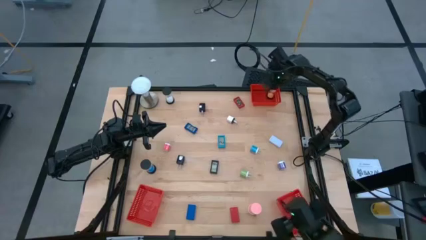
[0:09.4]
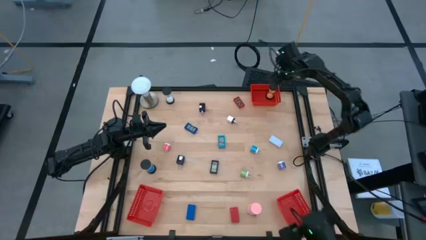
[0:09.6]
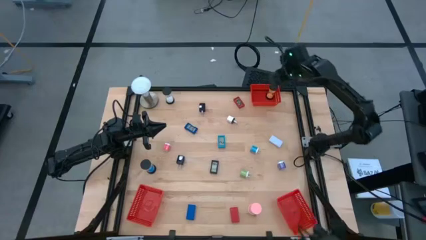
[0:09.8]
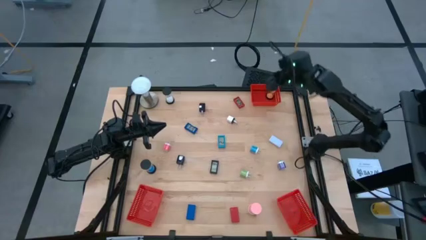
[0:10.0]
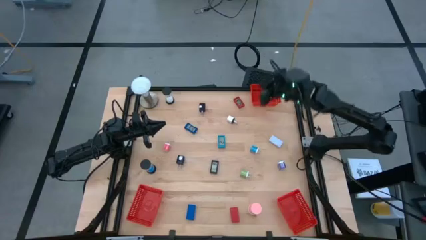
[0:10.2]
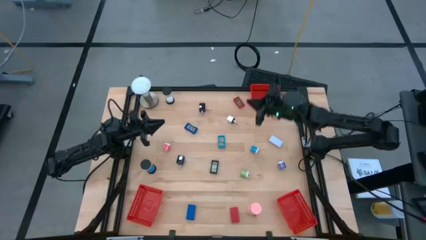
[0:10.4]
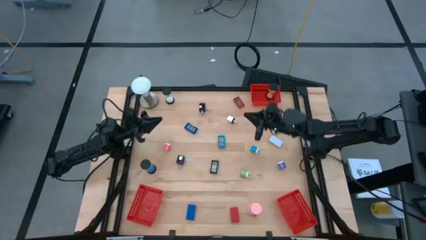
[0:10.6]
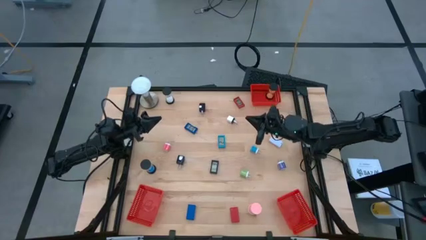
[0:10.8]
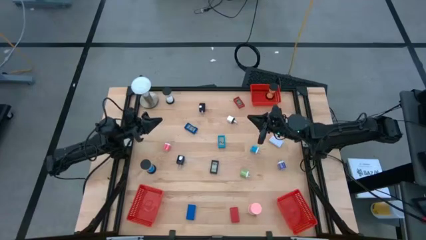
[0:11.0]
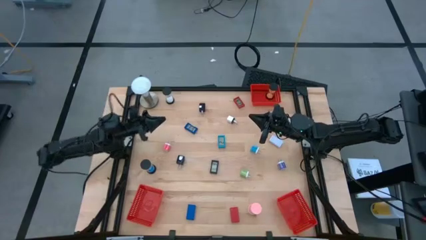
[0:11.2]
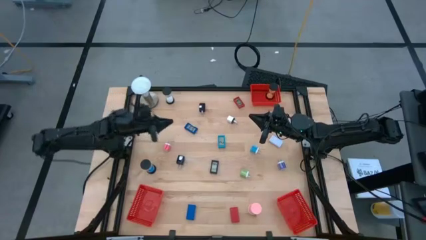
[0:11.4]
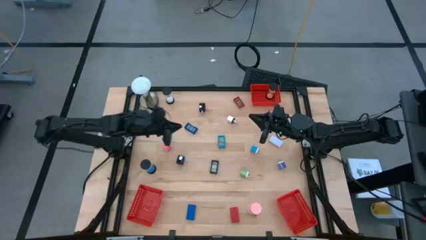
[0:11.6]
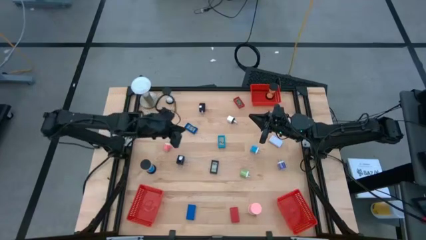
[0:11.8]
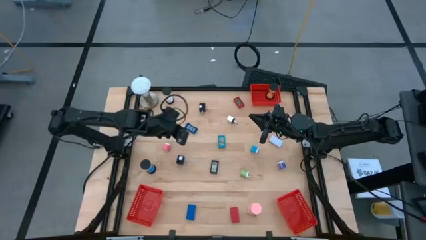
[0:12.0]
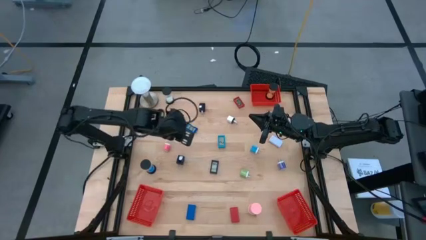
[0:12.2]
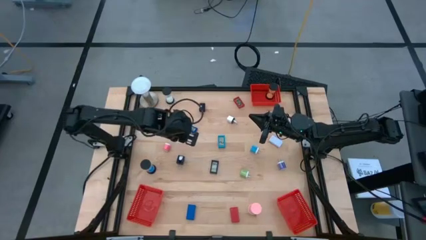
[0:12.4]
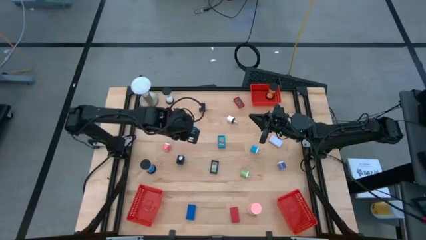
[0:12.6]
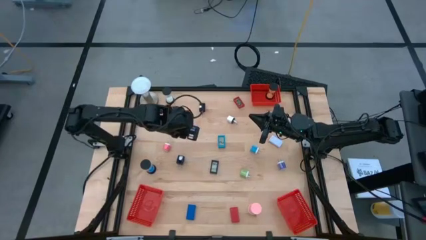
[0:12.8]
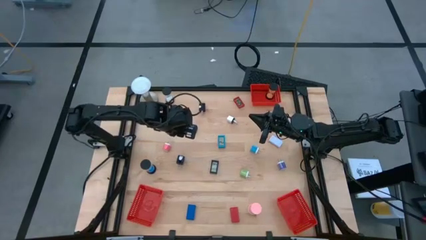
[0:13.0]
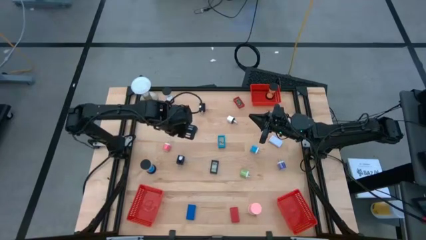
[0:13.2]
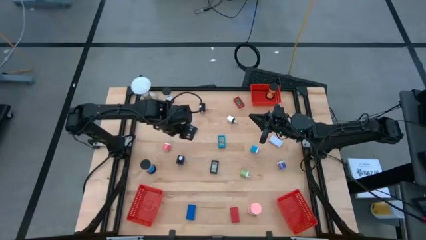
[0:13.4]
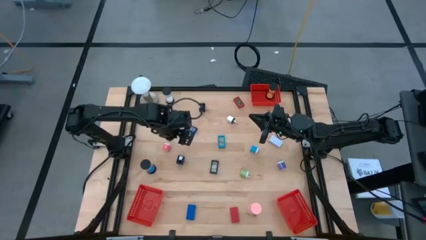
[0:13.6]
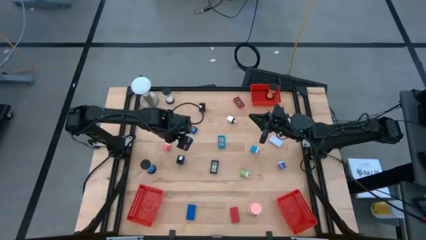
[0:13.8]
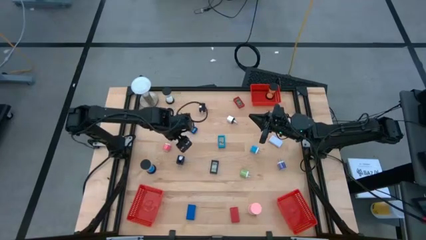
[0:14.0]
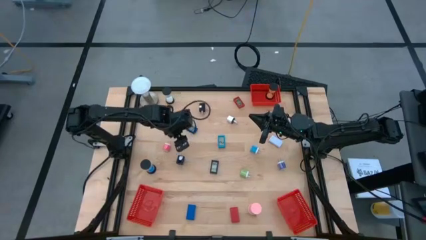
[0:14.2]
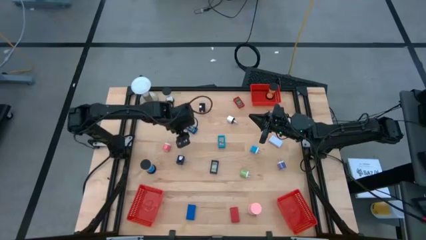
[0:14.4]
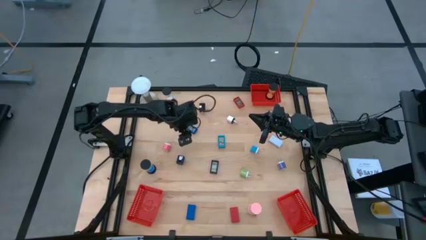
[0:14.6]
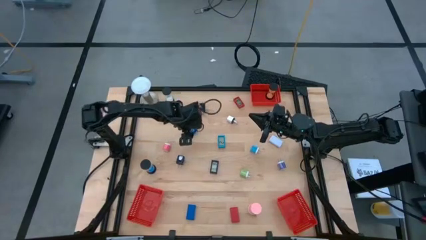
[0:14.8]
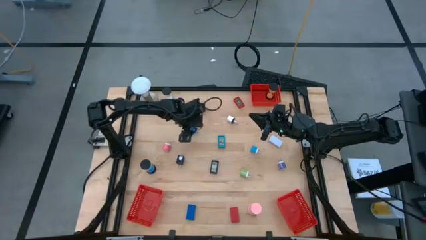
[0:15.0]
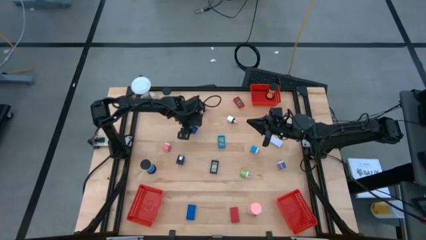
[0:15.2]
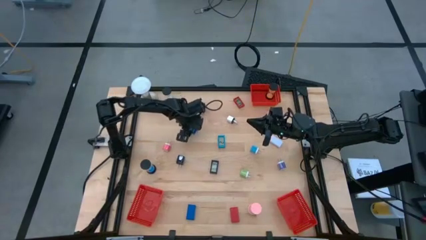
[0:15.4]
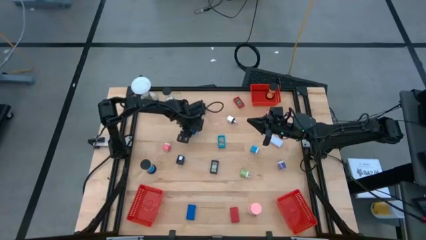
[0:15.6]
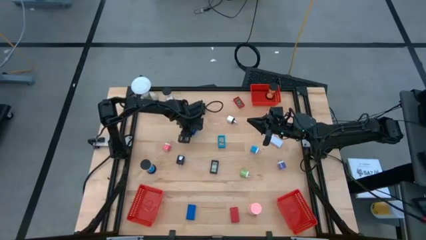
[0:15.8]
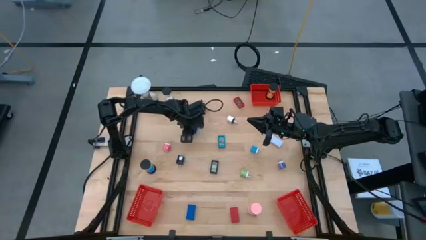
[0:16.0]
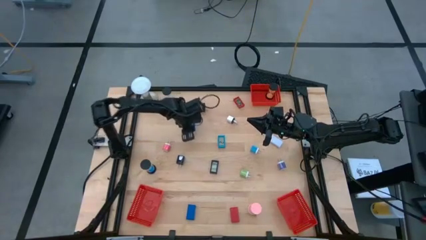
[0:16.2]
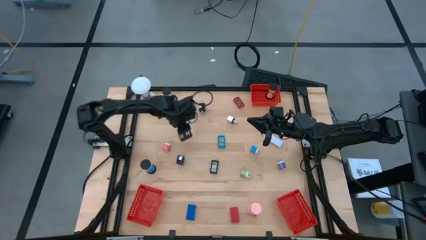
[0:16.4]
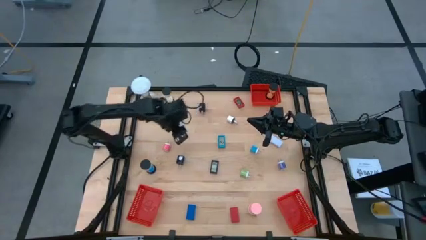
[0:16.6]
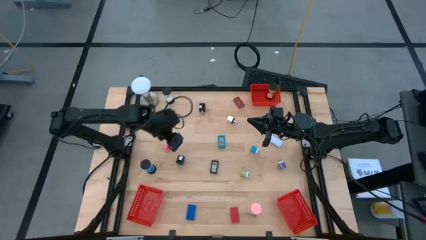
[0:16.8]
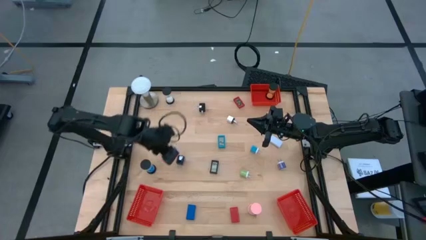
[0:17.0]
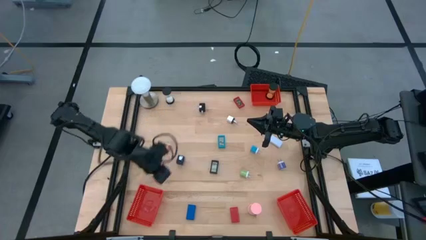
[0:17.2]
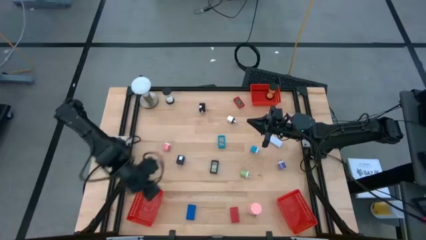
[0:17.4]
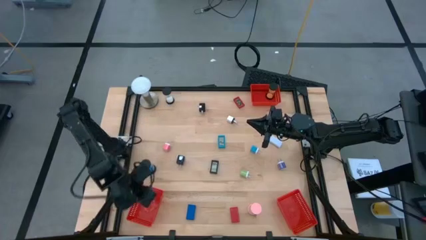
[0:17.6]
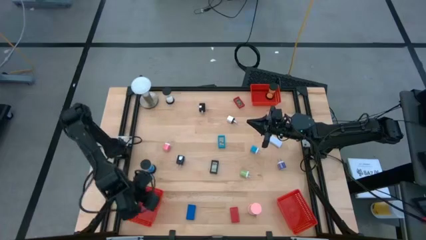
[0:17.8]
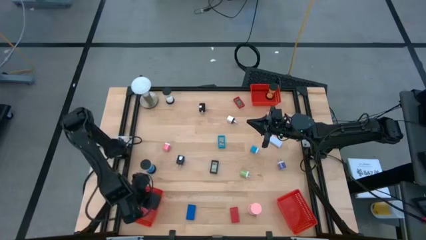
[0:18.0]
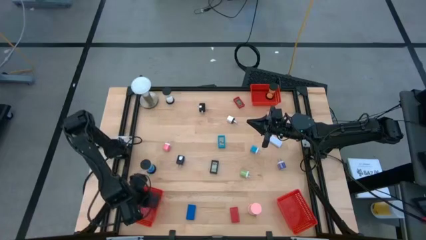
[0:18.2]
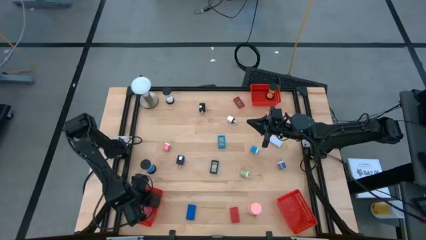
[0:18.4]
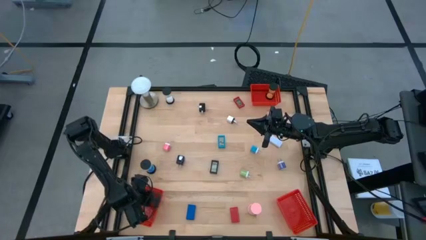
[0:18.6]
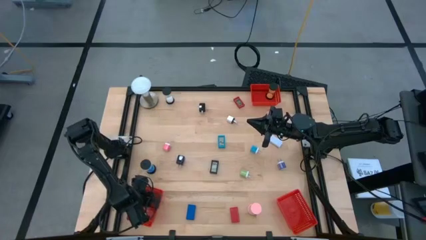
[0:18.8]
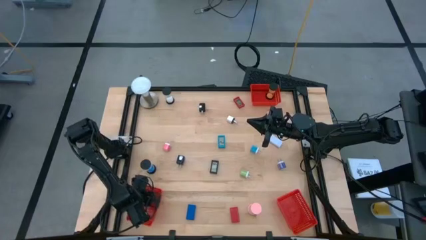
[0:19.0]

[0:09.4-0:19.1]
Task: Pick & Place Office items
Put the top blue digital clock into the bottom left red basket

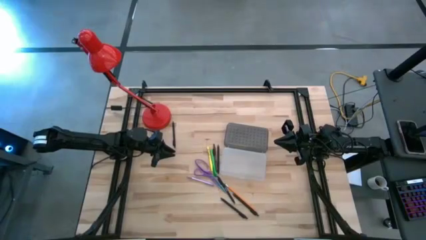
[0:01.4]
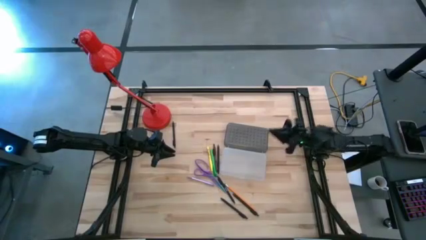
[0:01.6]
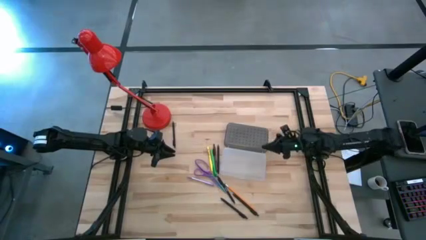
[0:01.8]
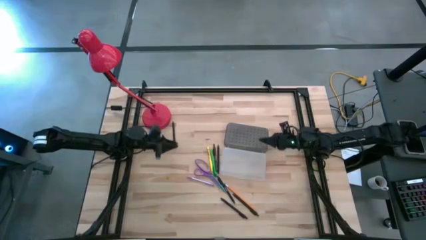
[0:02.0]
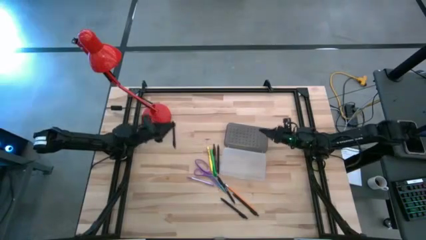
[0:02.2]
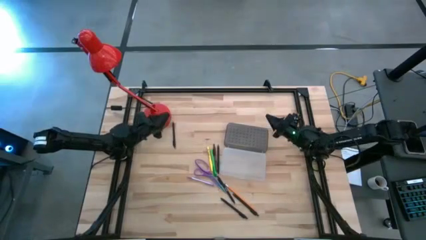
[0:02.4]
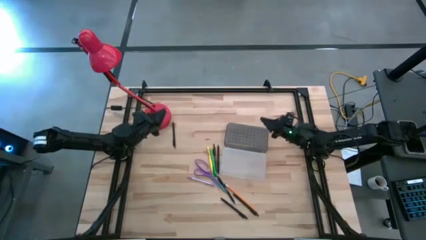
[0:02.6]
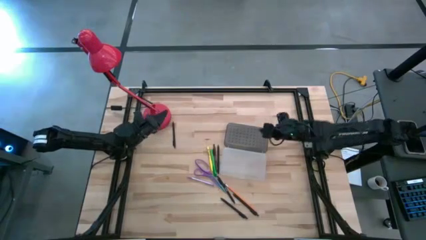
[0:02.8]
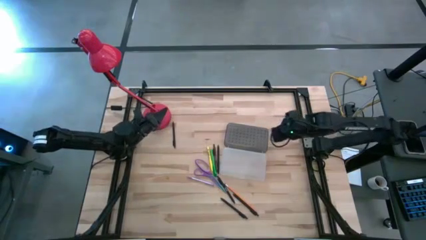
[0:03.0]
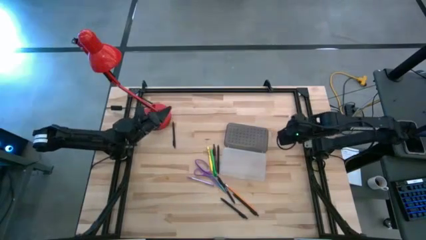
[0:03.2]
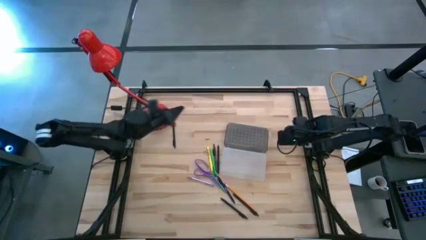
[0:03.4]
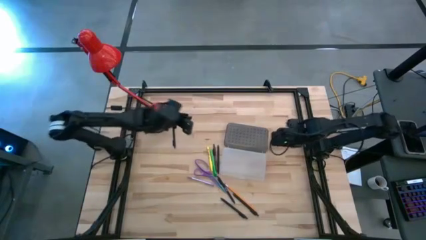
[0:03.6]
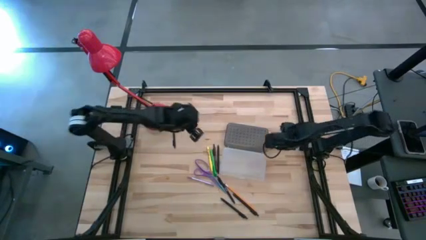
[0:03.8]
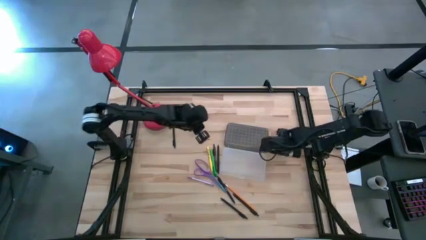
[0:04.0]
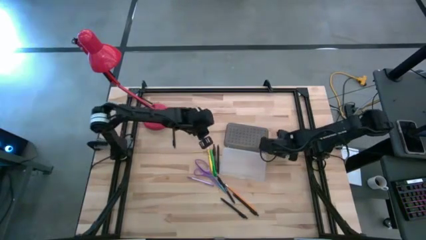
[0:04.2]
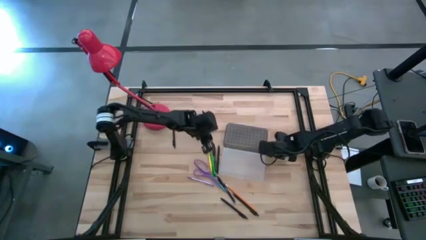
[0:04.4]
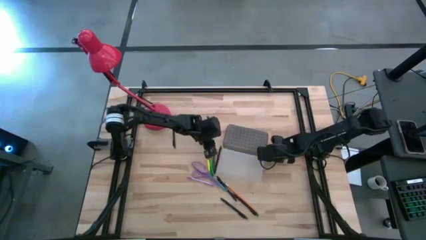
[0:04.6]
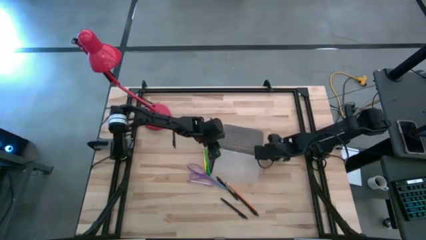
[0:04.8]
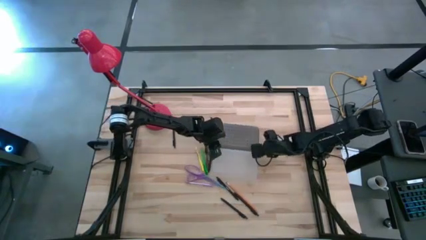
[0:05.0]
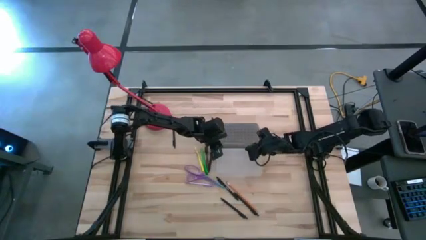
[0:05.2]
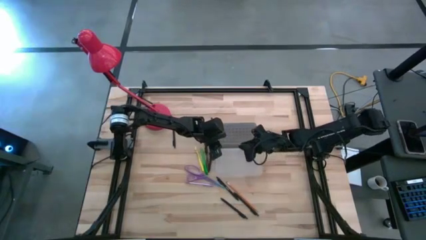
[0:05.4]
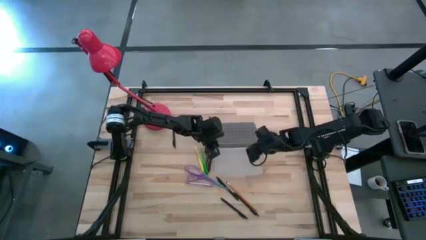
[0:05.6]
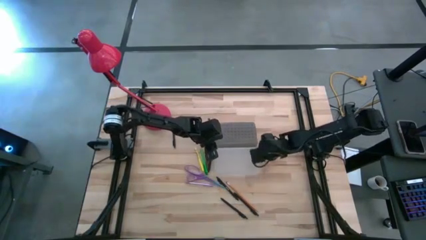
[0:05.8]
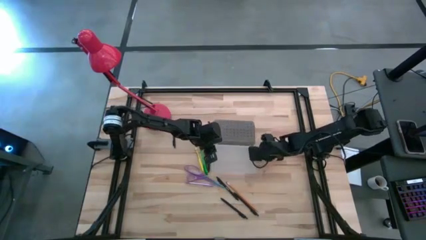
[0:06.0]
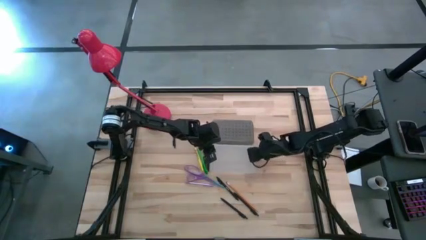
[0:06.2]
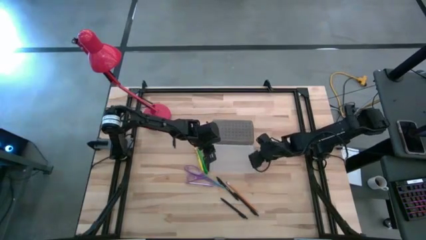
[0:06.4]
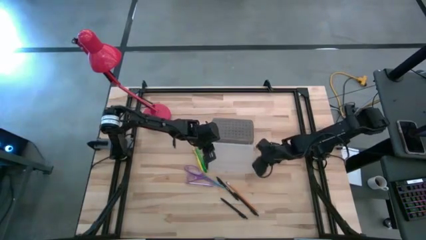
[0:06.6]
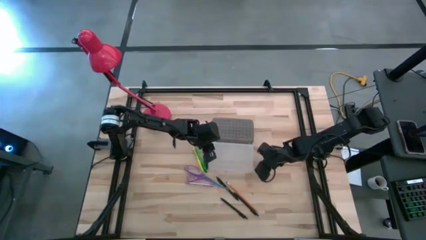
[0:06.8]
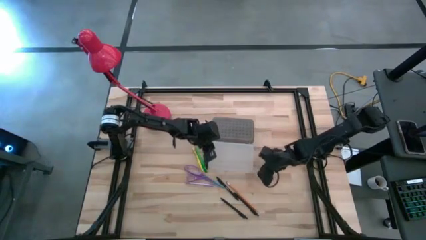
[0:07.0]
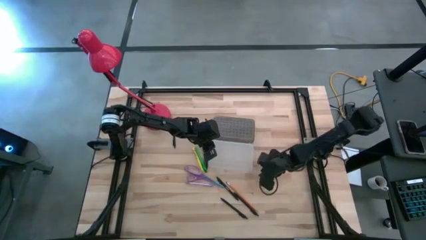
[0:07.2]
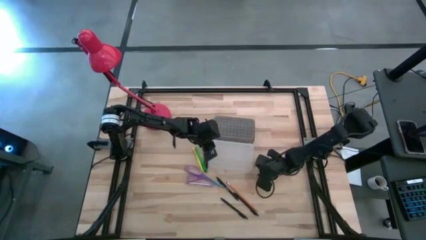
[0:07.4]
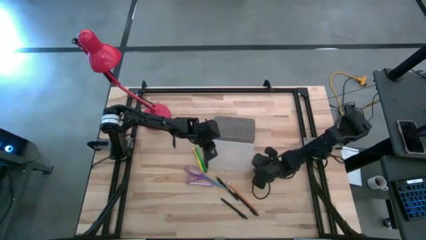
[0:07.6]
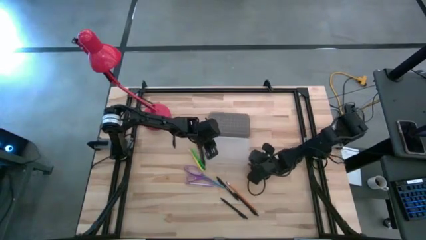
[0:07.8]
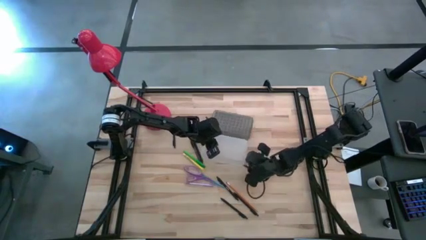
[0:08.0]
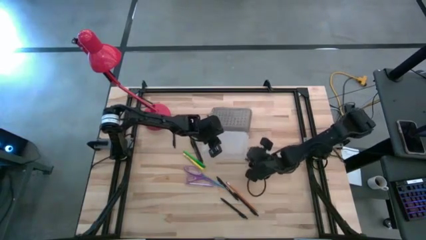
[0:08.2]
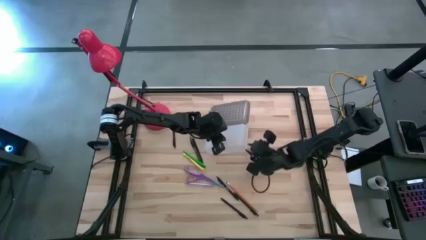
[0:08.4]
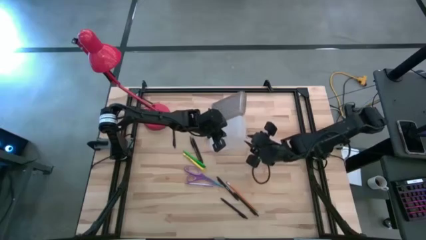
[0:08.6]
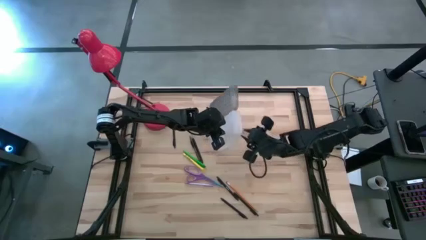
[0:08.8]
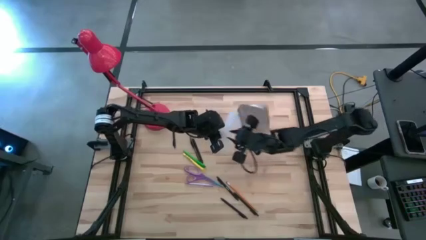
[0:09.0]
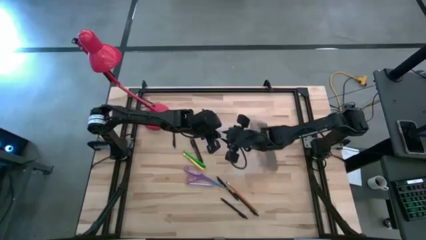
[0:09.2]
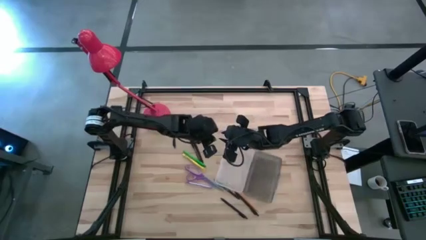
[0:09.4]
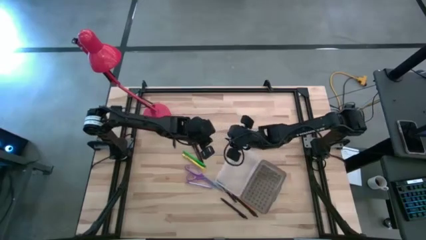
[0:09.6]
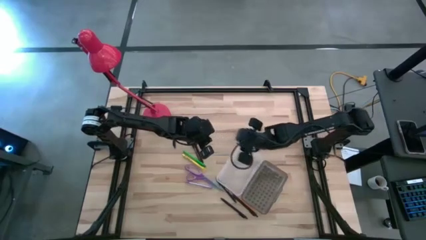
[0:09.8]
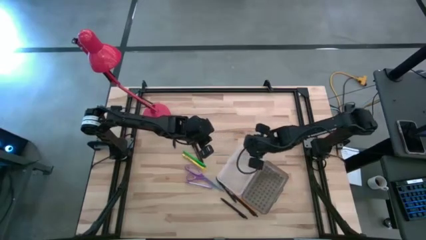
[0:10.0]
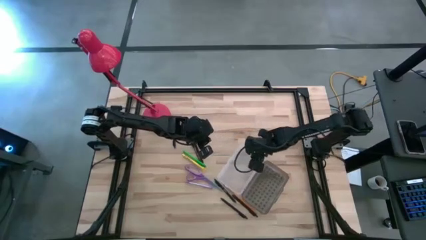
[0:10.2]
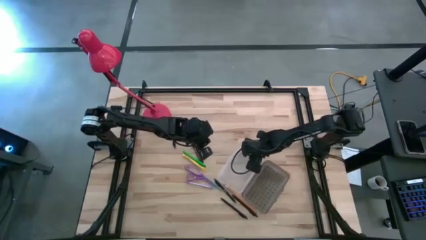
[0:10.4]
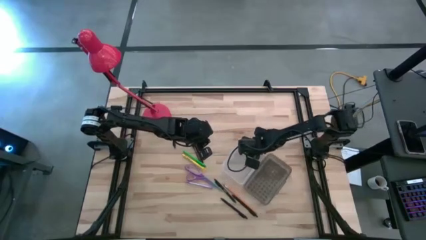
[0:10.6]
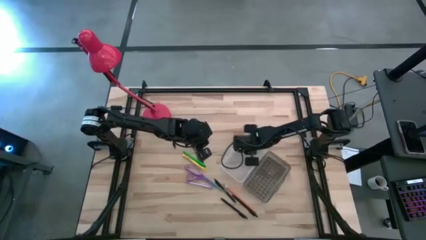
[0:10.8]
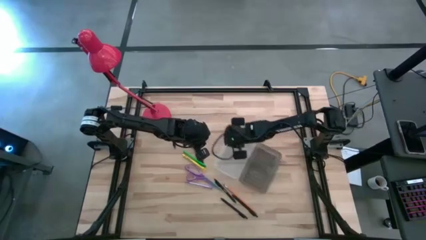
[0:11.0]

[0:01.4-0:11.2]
Task: Pick & place school supplies into a supply box
Prepare the supply box
